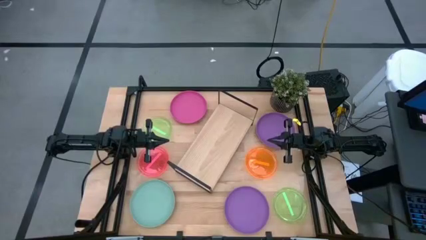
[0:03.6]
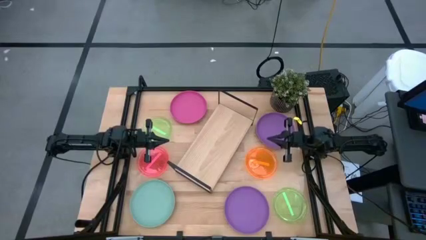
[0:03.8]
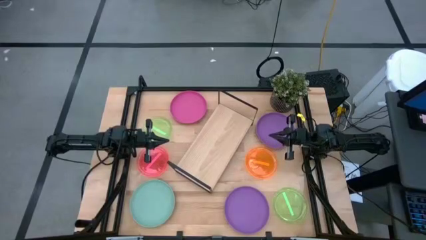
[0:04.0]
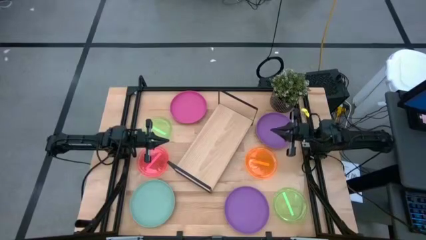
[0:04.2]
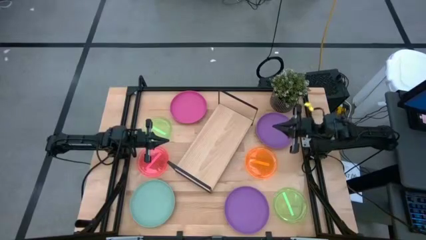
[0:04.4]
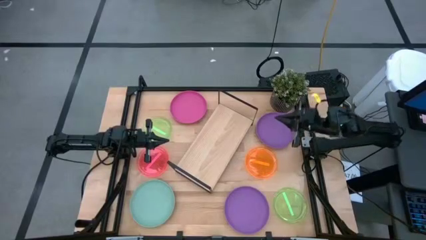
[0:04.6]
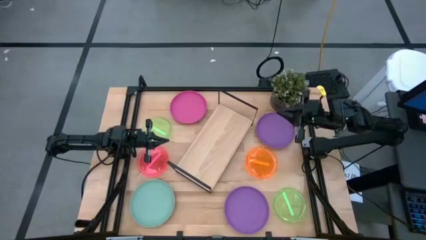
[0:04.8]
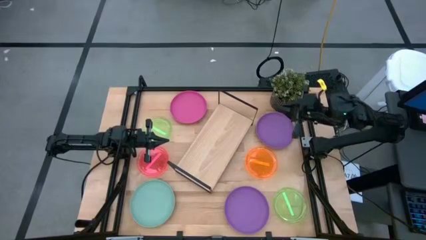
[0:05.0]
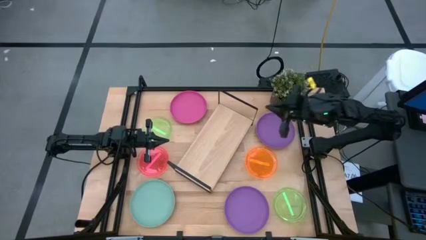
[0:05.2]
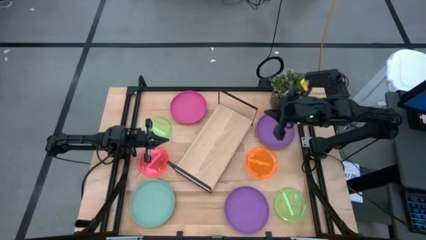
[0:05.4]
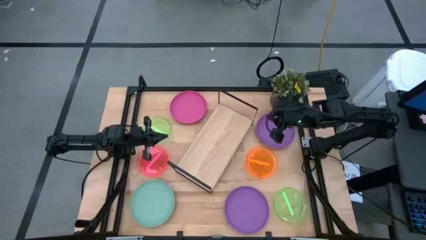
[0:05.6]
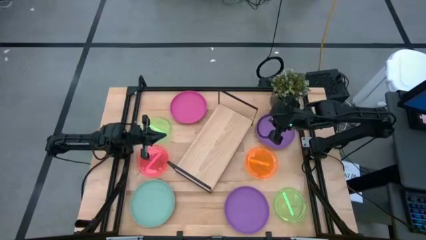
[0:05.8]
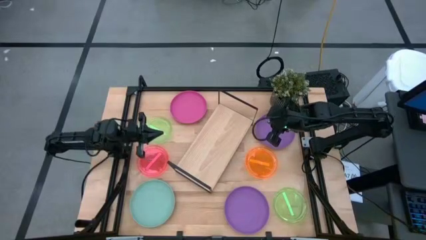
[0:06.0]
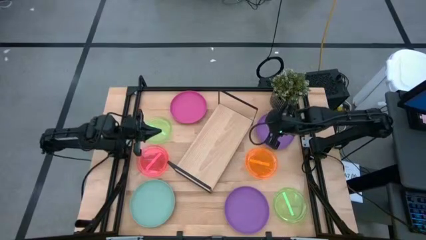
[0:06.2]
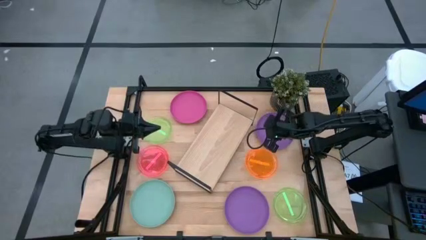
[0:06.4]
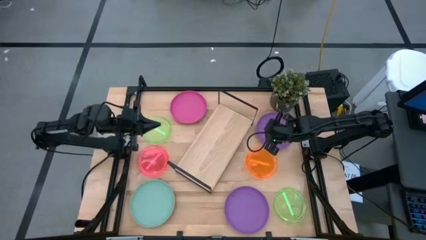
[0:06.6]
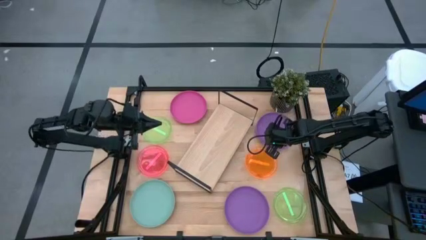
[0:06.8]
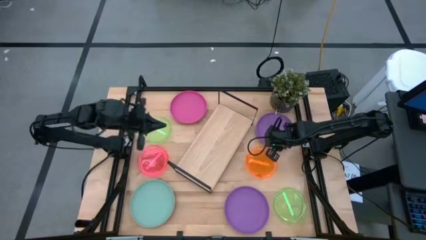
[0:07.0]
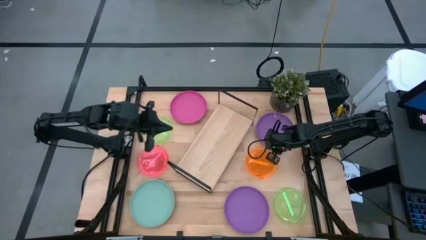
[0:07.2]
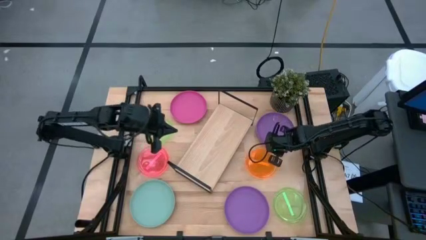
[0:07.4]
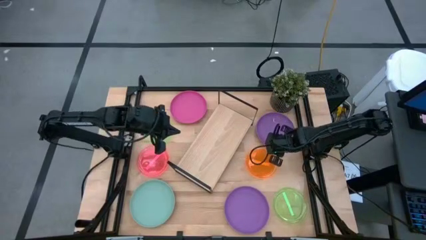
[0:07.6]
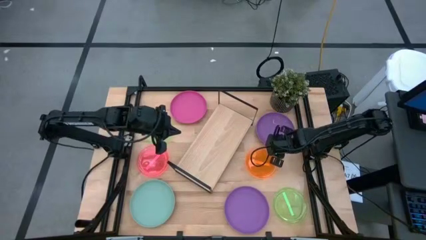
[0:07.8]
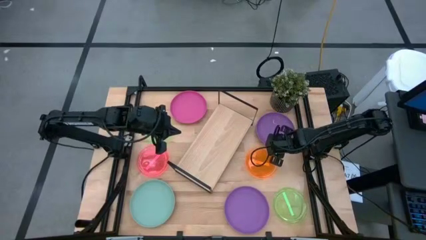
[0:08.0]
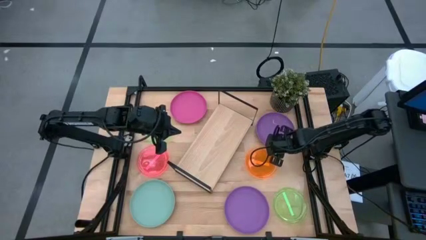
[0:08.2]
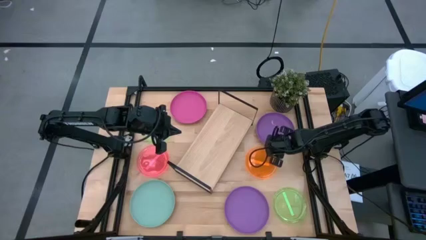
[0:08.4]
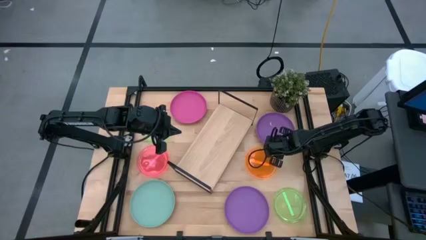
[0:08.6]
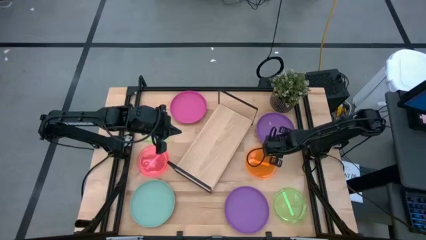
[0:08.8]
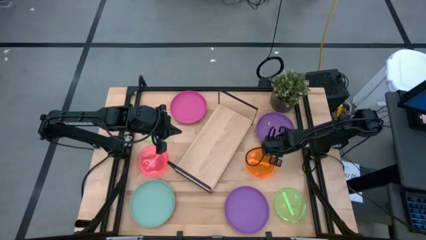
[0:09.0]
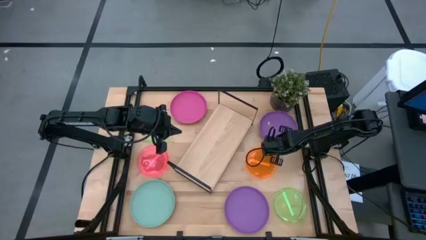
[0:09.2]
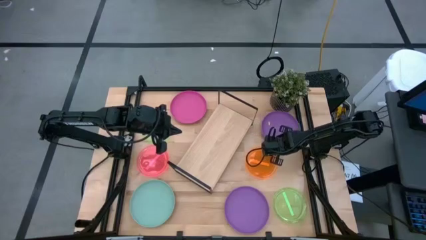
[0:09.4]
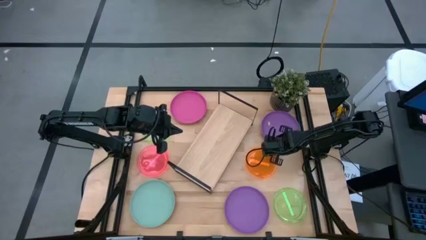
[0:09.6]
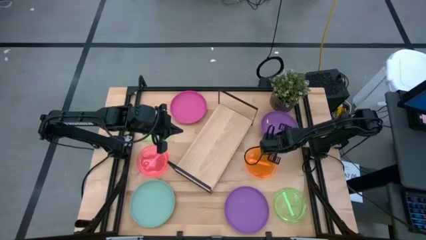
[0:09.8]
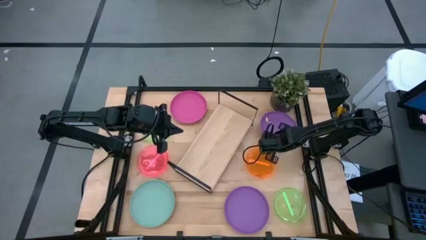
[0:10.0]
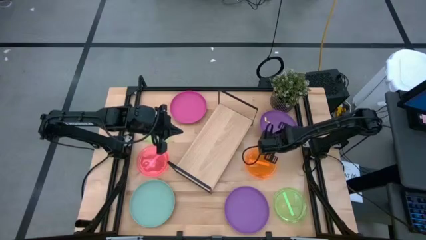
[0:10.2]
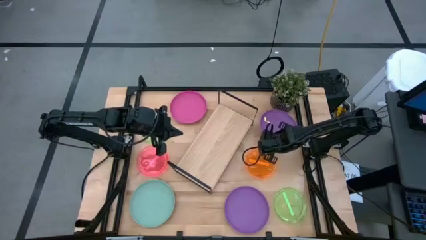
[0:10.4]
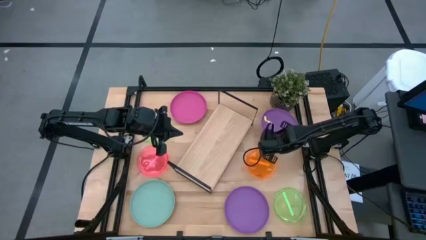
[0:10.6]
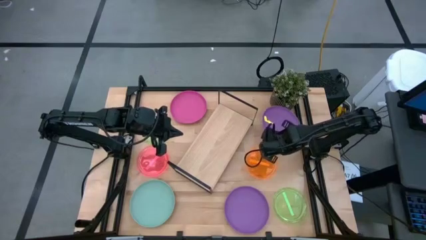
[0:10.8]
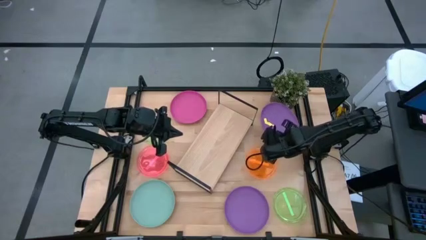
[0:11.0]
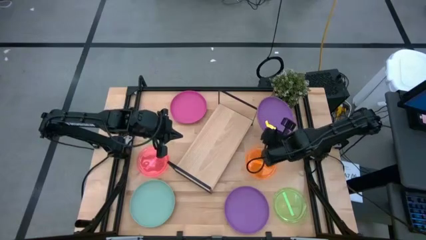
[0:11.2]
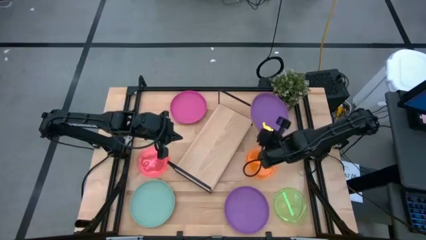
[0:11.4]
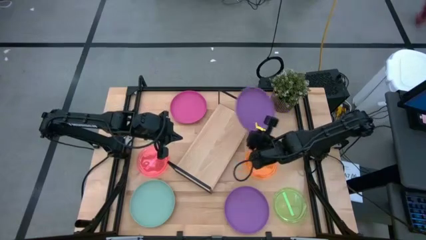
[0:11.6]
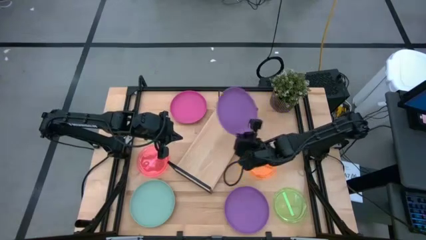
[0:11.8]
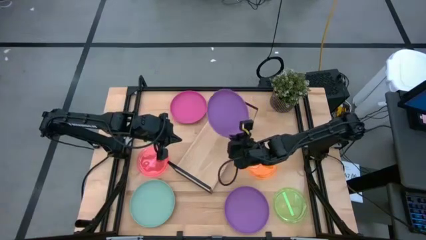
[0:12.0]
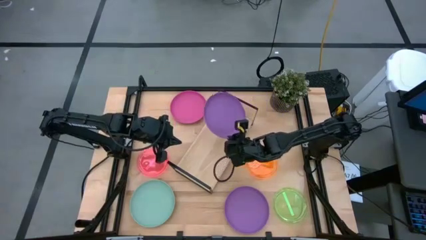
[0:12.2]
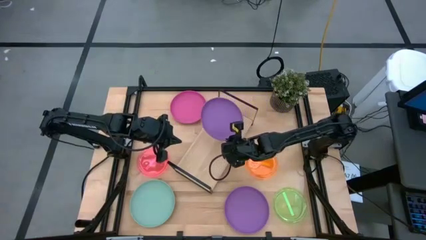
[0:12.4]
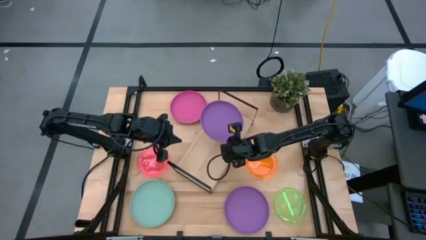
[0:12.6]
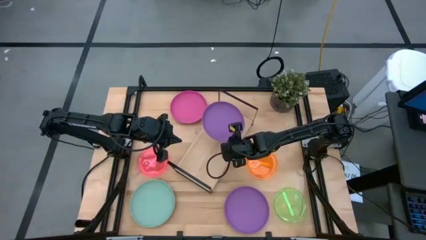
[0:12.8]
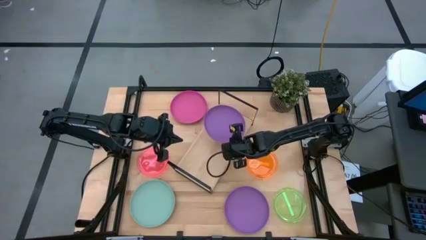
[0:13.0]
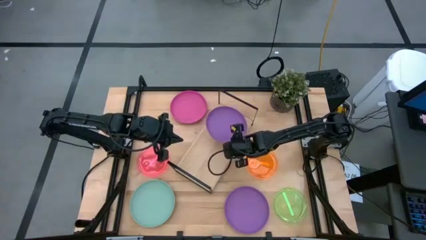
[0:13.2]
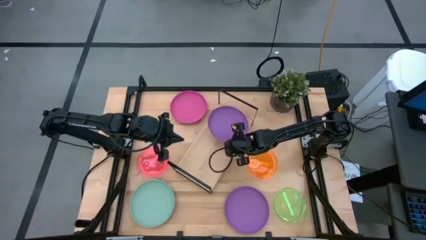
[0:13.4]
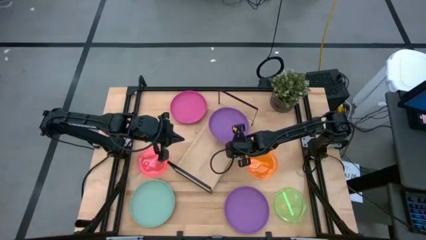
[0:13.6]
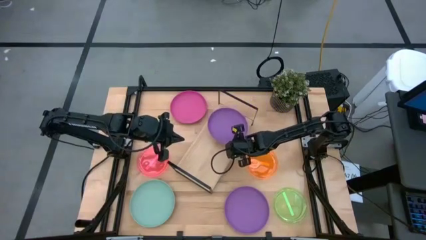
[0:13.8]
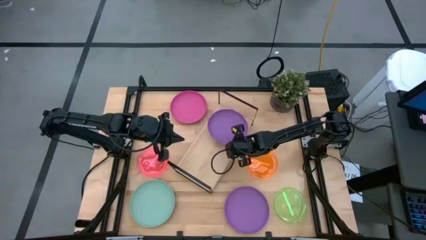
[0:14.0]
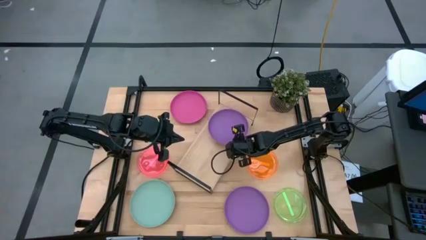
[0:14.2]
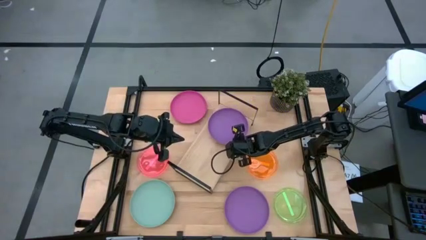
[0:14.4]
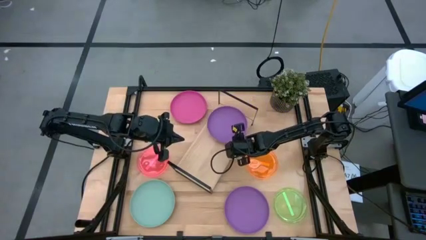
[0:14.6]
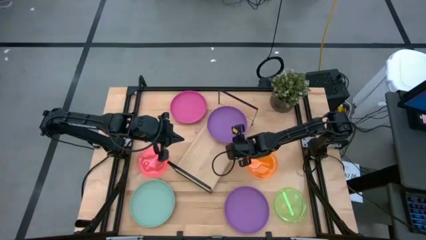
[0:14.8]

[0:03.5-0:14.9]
Task: Place and stack plates onto a shelf
Put the top violet plate on the shelf

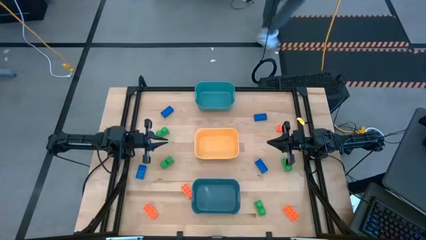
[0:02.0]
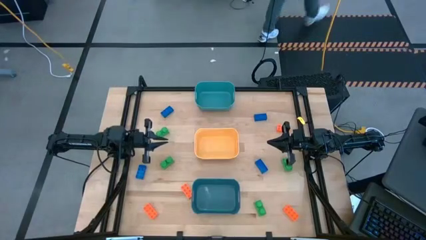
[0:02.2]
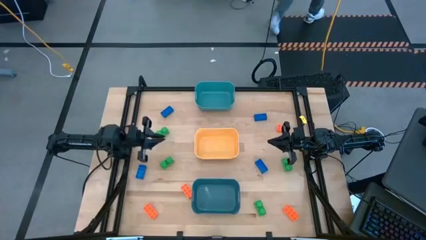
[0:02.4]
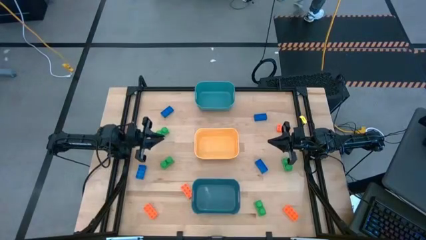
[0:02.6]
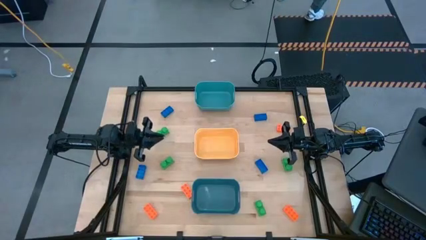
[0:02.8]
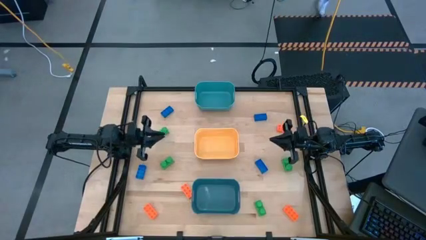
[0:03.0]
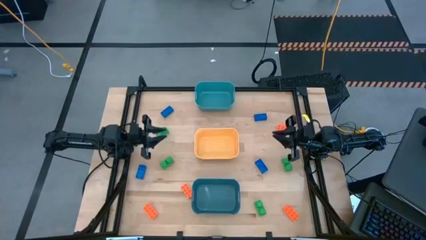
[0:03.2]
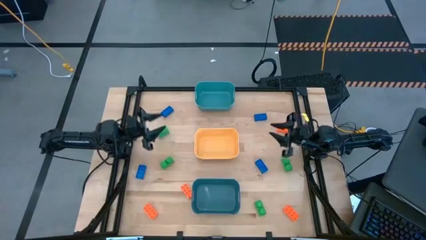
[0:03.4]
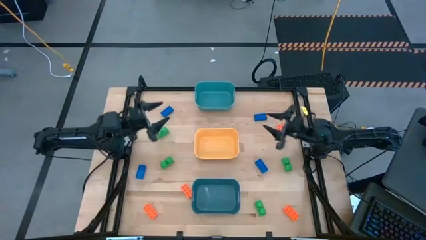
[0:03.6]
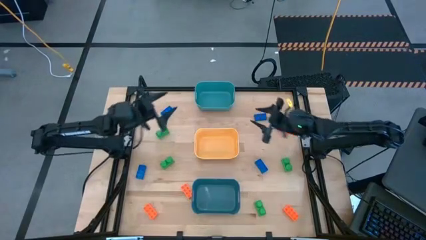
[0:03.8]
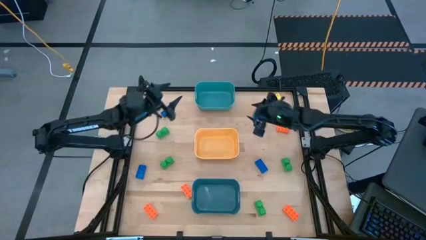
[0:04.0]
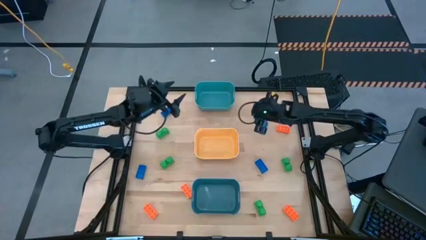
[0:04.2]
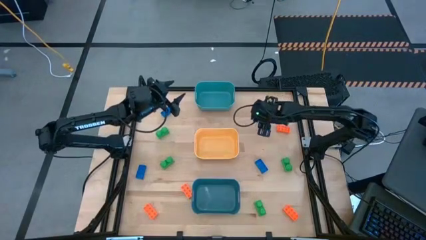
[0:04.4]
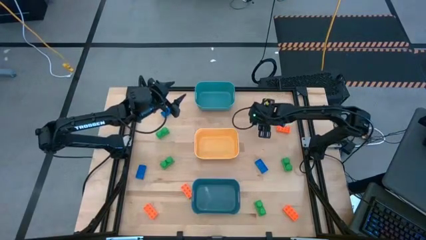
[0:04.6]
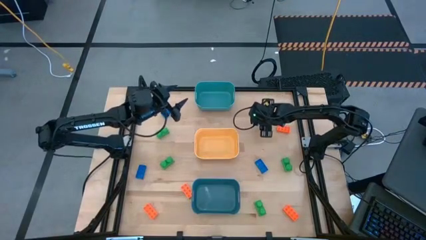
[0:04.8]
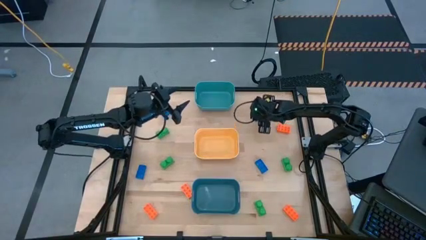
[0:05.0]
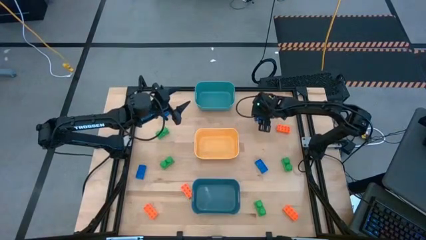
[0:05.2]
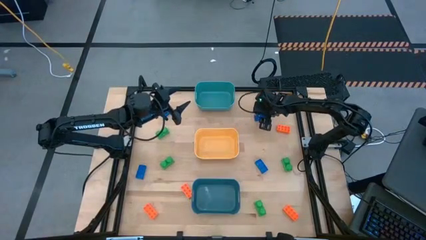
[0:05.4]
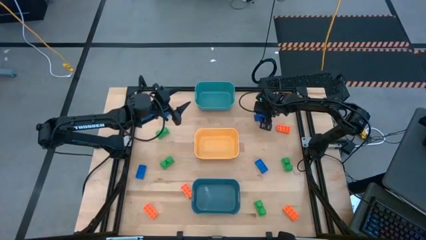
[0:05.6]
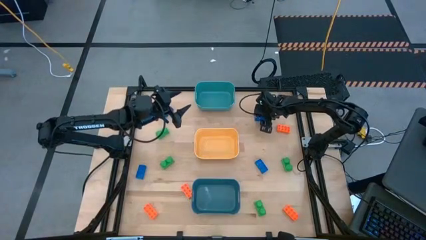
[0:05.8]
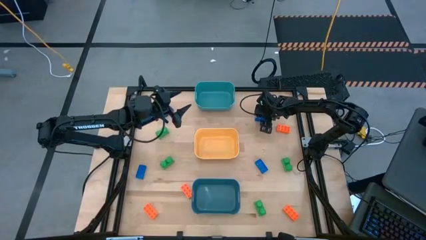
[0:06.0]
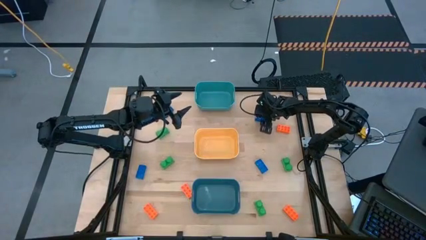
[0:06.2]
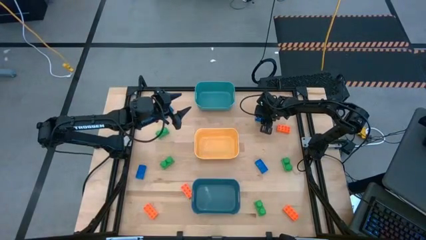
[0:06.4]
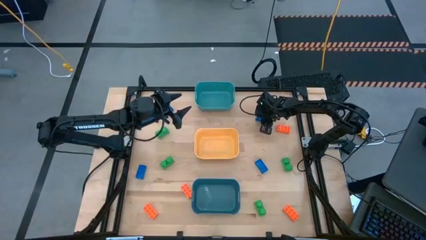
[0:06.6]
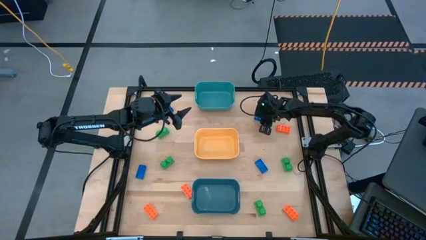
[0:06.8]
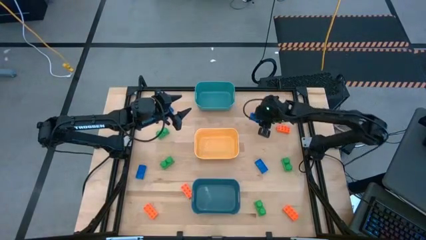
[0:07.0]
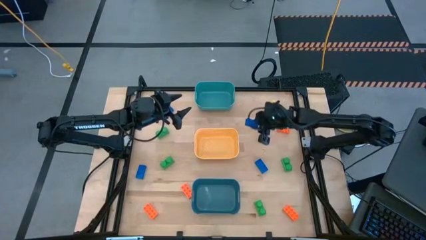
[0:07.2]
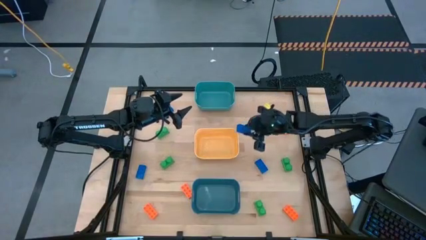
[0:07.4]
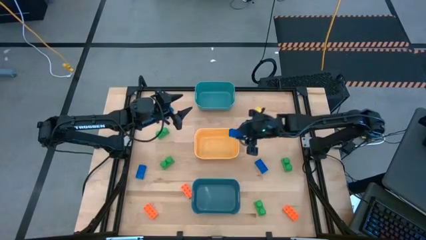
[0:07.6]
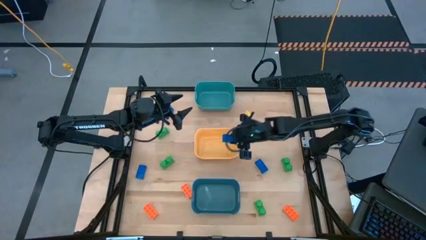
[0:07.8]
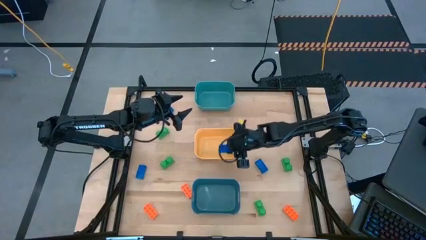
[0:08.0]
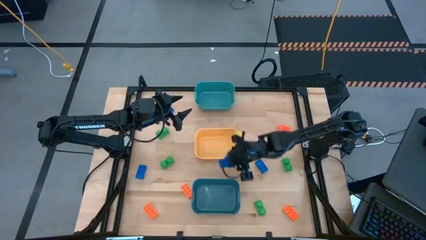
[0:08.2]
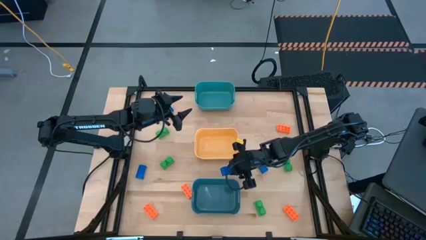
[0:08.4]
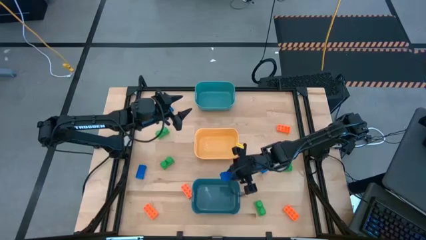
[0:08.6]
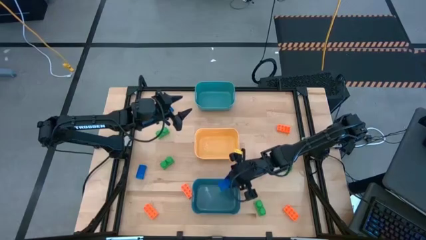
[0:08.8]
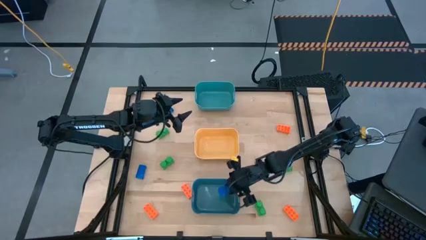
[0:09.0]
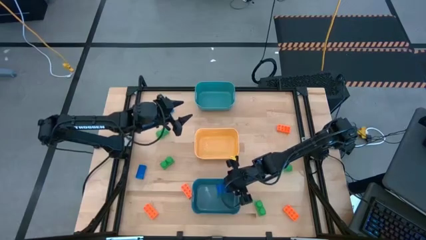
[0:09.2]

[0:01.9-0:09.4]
Task: Sort & place blocks by color
Put the blue game piece into the blue bin
